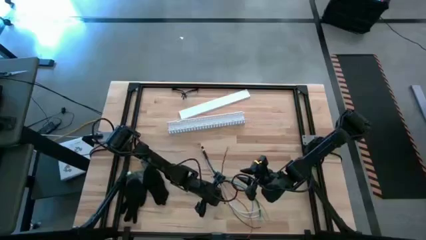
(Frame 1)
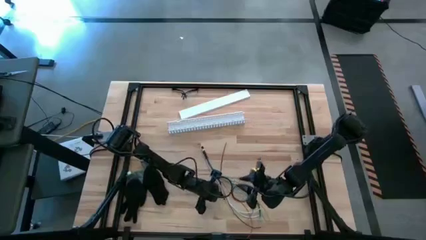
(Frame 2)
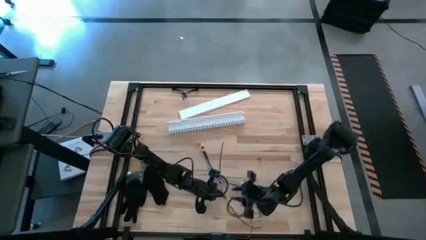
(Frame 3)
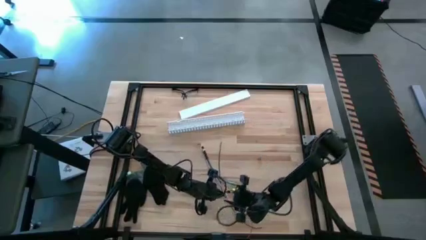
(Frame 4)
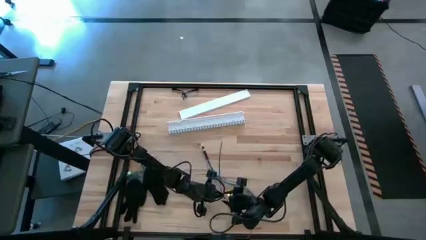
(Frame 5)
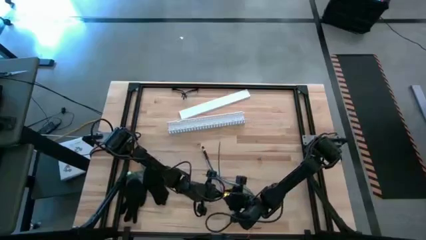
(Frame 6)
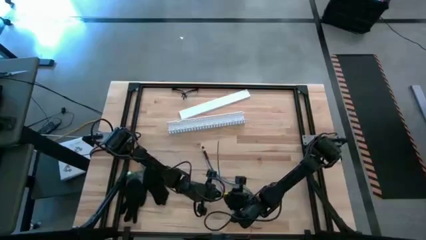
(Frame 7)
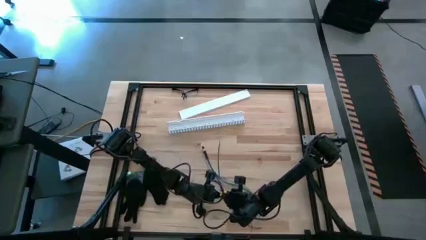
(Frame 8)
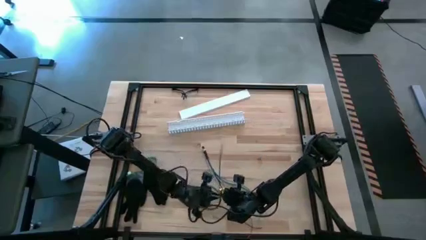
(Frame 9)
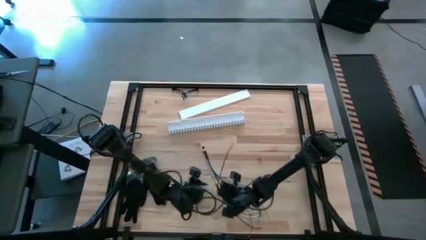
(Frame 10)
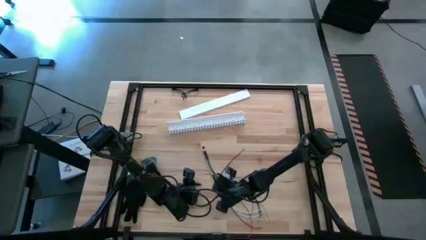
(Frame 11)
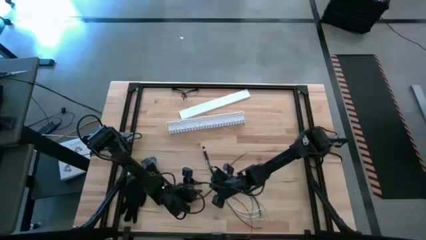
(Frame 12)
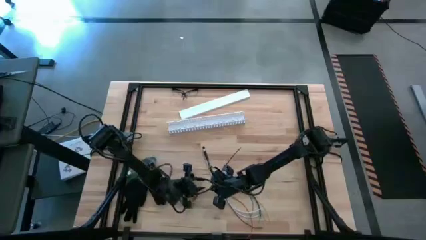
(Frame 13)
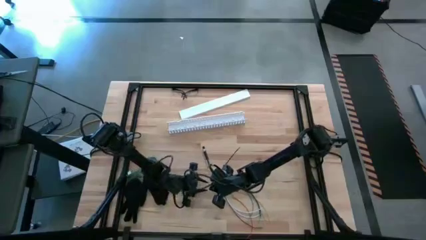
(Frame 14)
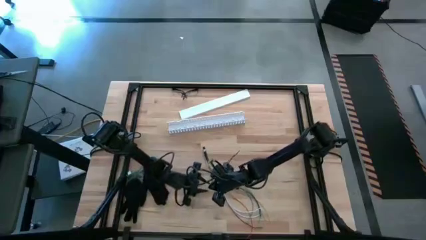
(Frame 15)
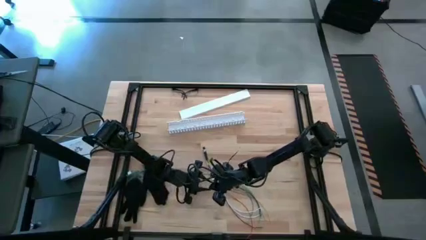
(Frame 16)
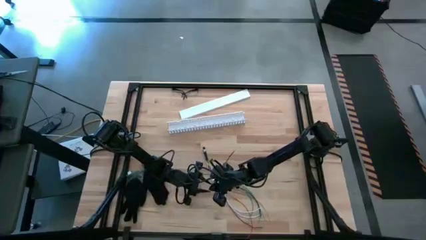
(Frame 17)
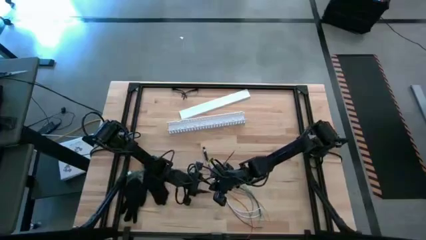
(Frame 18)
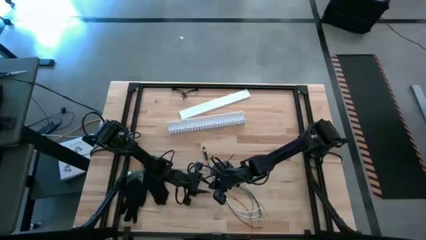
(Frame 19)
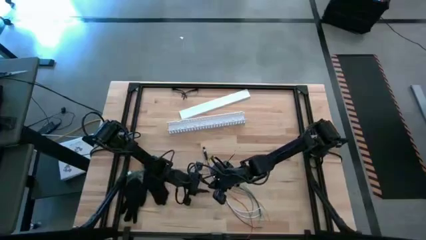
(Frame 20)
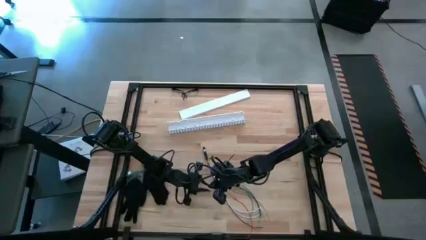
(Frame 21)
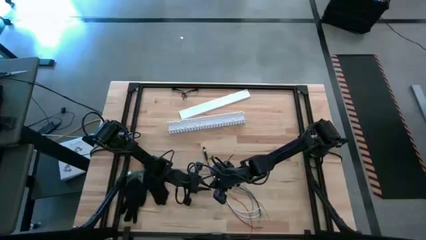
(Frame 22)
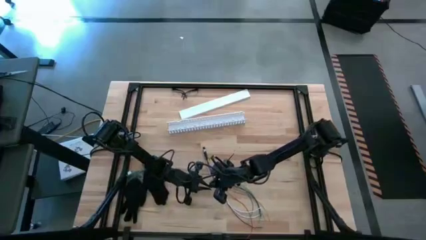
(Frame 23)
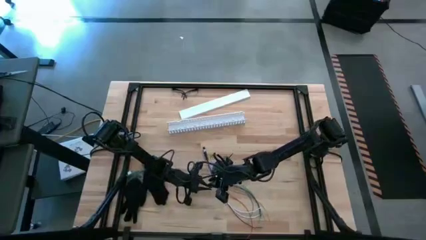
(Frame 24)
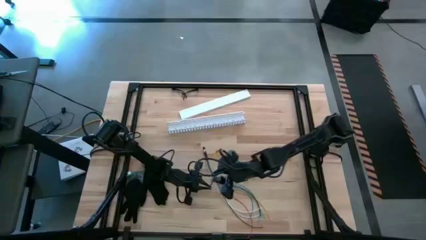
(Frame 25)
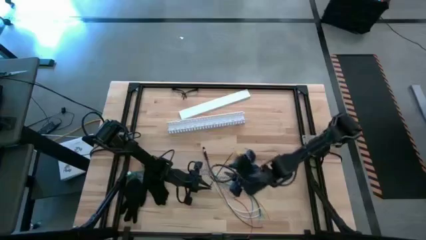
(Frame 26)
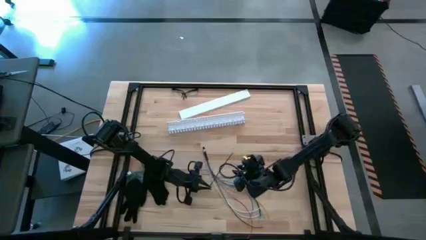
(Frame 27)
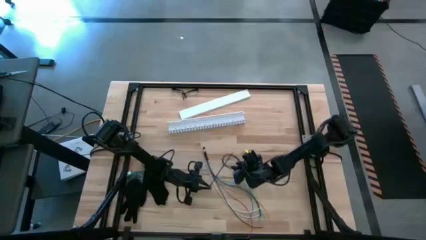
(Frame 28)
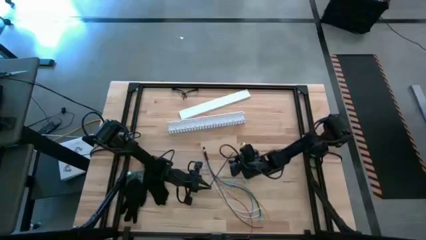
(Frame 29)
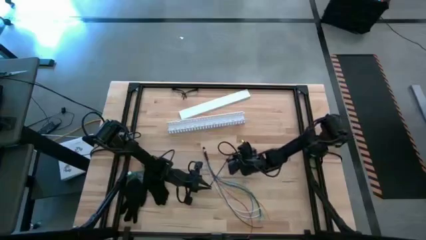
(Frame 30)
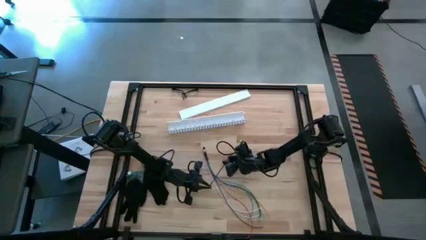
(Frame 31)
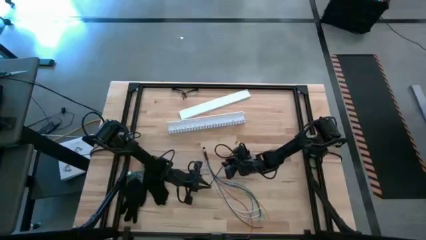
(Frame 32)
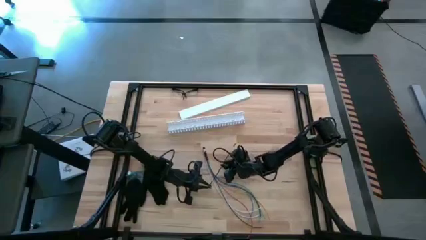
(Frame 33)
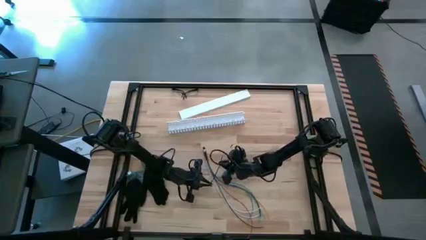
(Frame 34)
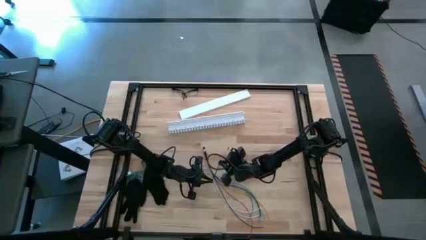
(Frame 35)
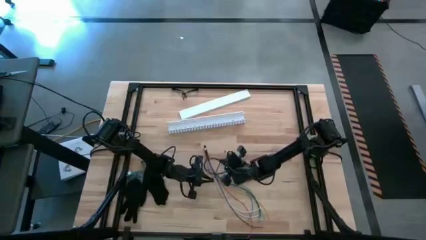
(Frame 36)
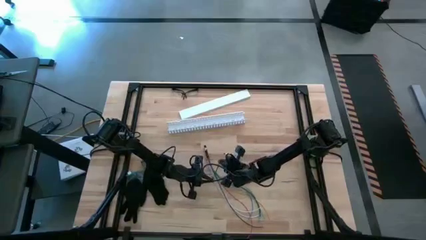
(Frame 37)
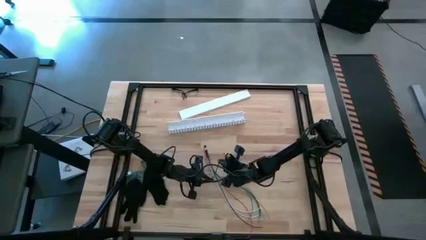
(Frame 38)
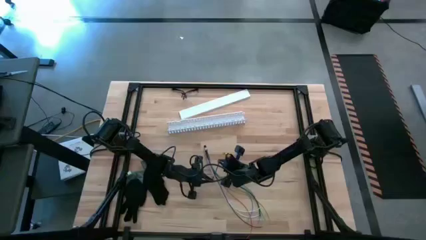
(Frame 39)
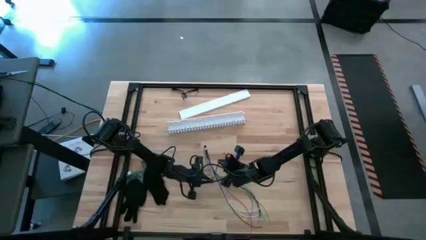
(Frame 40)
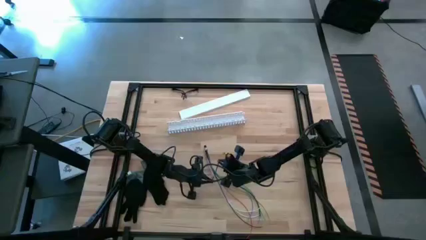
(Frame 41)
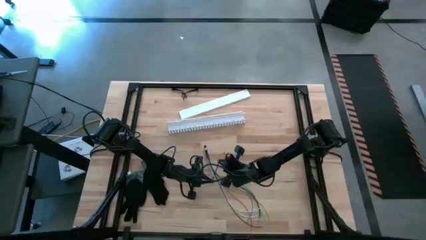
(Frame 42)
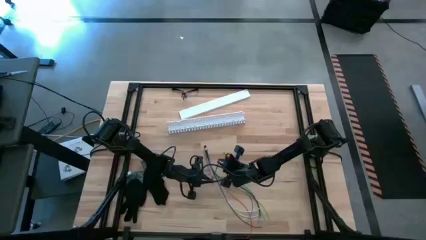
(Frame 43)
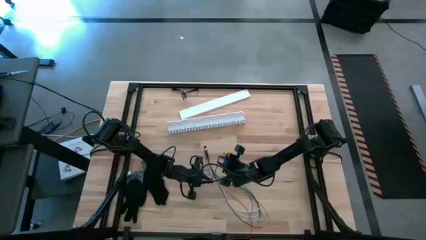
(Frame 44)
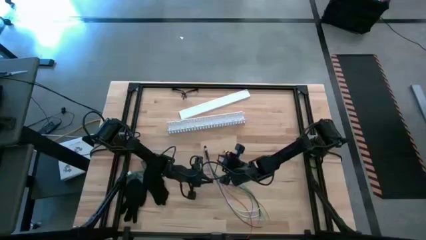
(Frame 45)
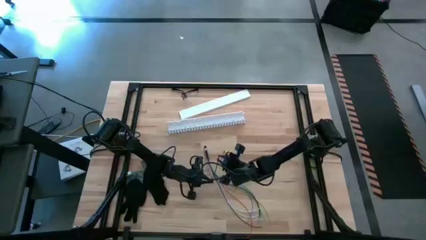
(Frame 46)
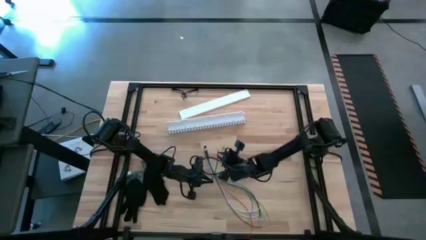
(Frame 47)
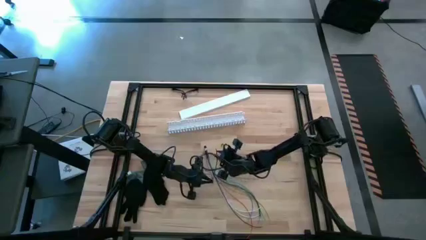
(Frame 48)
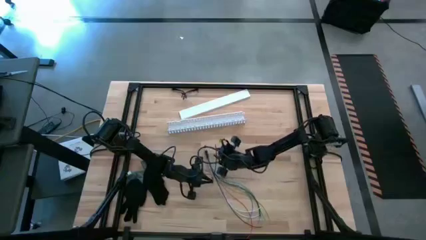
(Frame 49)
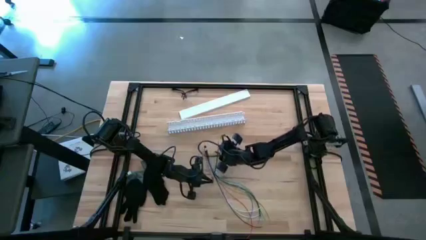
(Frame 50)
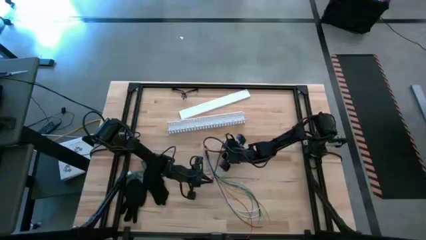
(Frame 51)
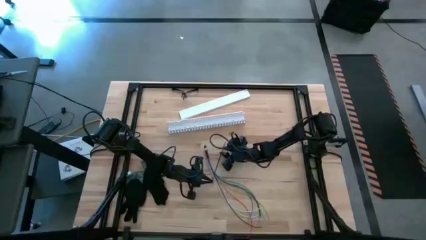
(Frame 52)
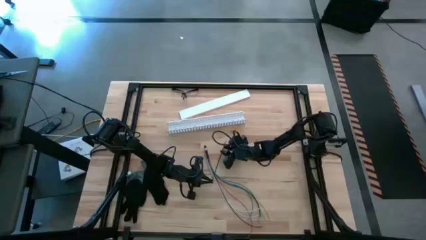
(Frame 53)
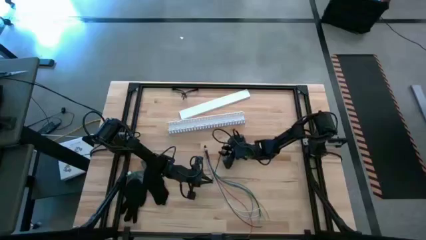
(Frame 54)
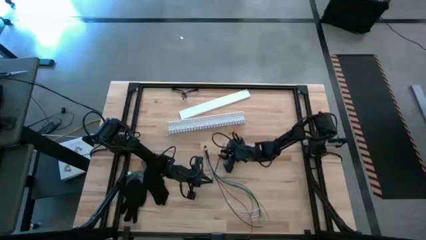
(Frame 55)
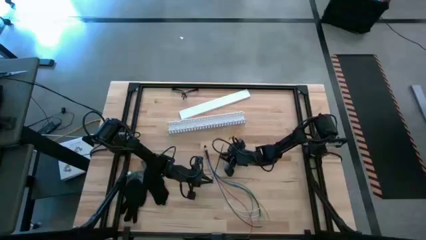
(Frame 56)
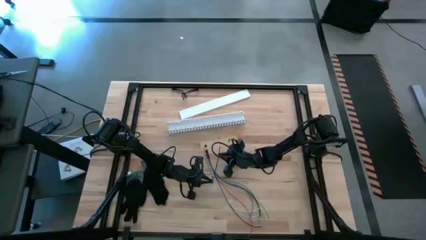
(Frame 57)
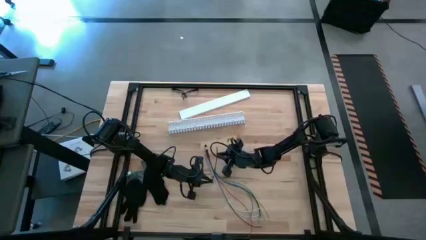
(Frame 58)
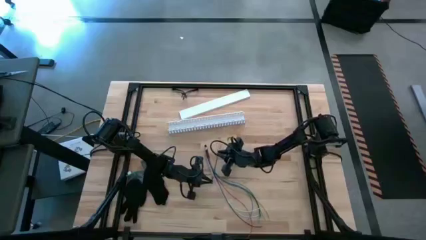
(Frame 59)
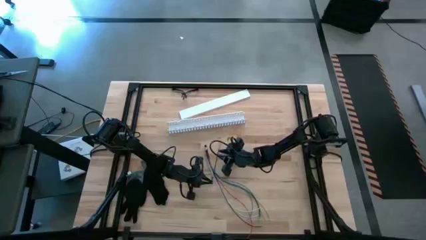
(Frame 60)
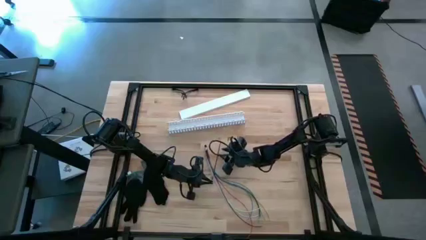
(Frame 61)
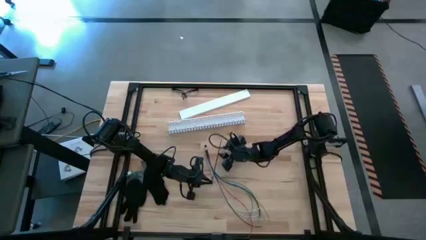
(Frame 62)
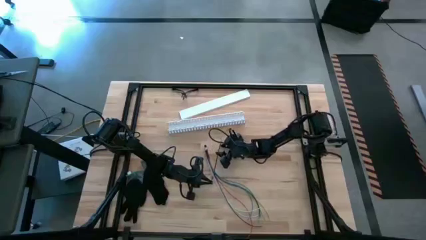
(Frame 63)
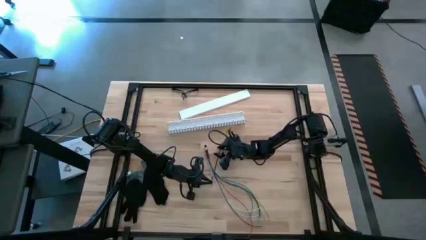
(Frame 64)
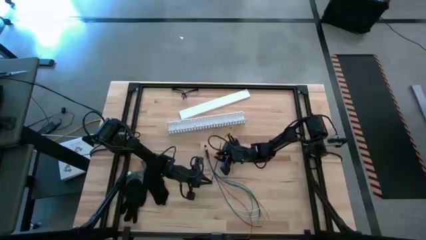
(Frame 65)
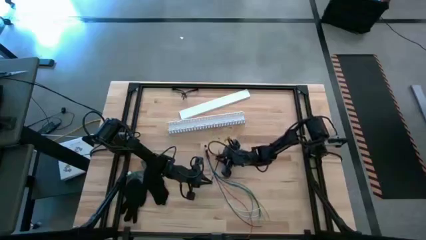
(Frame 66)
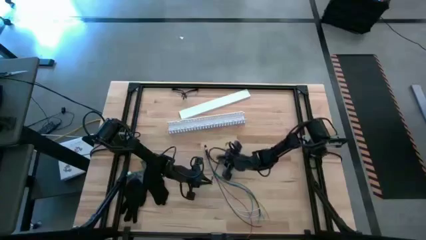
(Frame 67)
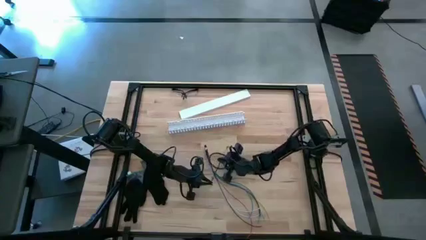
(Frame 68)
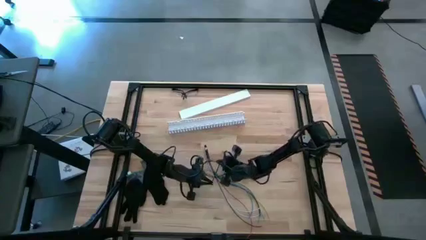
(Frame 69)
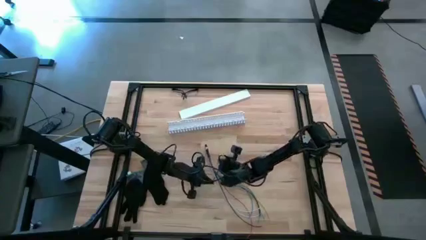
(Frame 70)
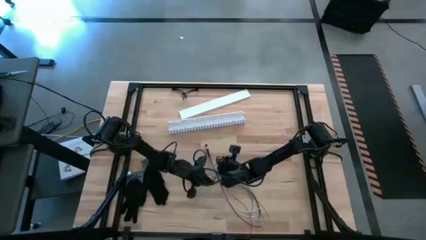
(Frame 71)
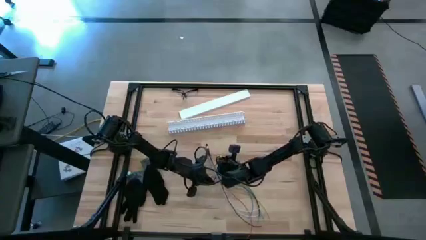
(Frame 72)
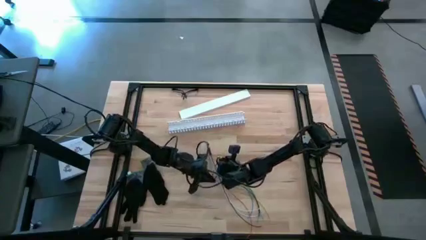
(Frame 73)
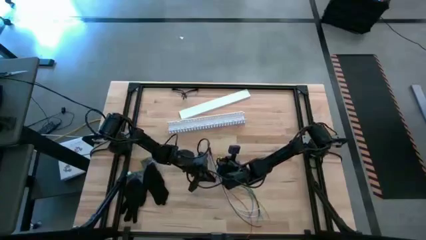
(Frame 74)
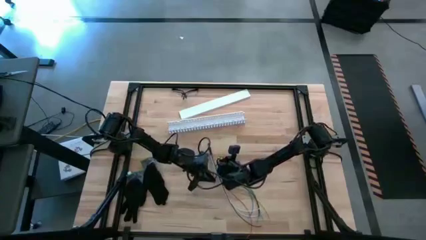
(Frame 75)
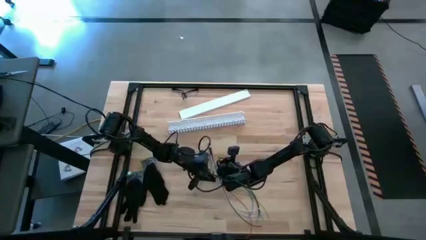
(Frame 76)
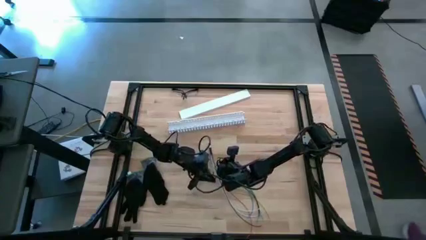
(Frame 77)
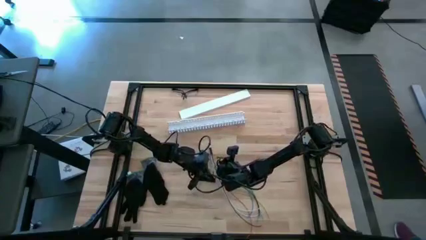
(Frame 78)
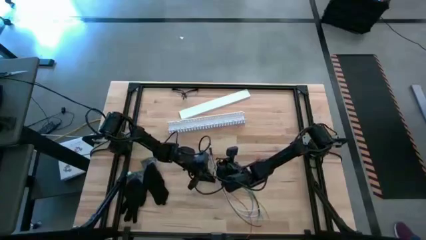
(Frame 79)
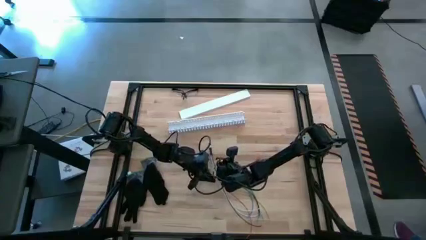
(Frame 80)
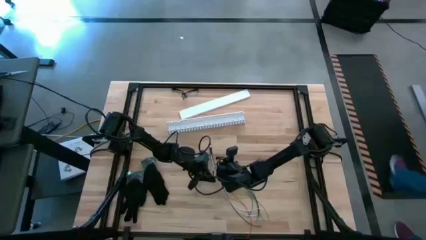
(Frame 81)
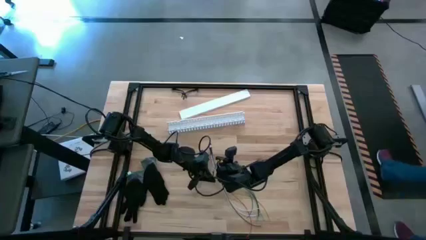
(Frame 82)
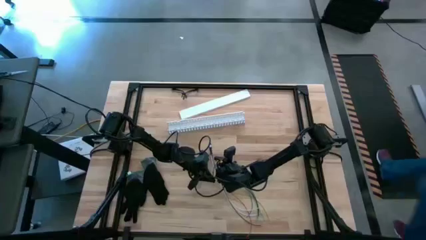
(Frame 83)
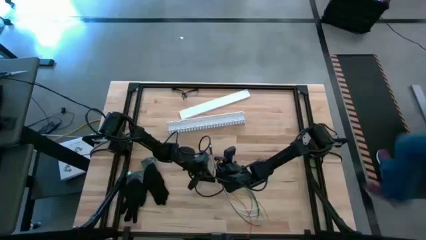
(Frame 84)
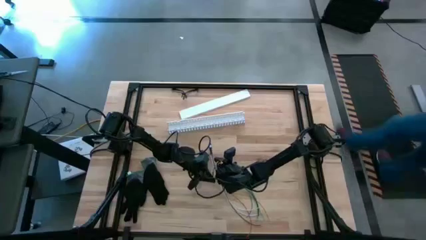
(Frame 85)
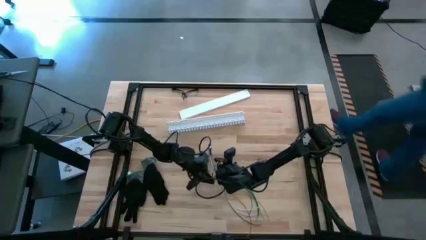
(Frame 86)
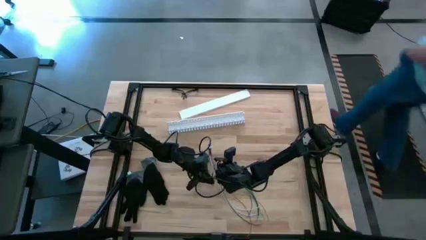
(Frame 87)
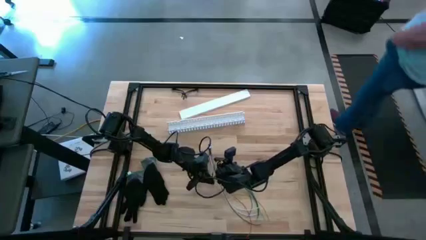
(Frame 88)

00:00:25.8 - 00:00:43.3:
Task: Ziptie cables
Wrap the black zip tie on the cable
